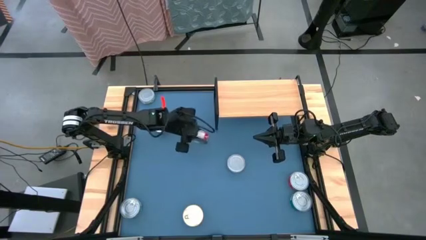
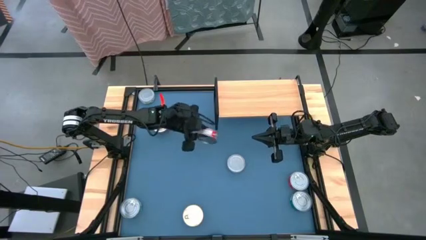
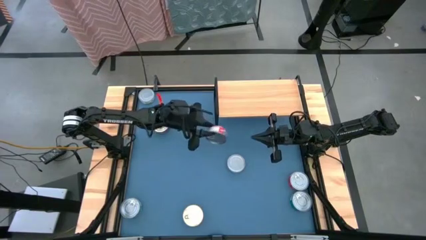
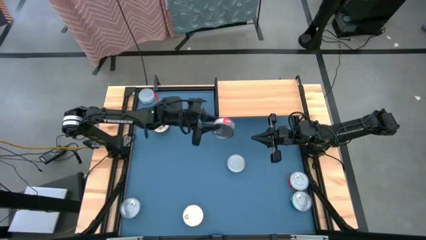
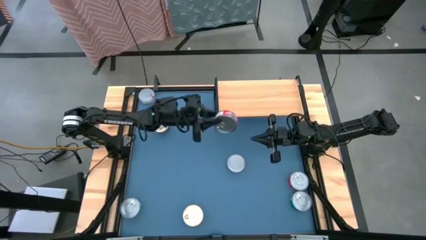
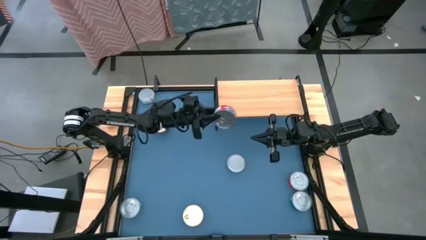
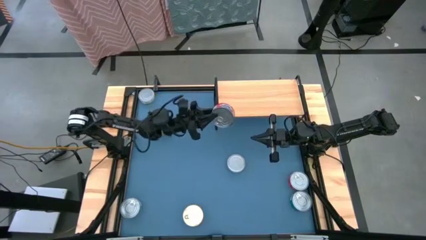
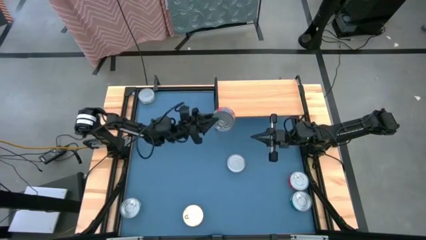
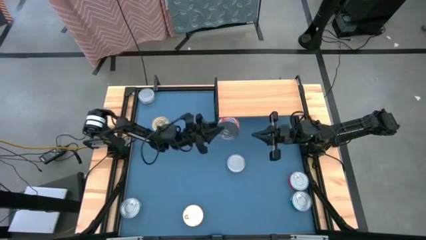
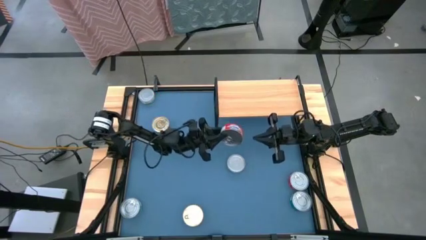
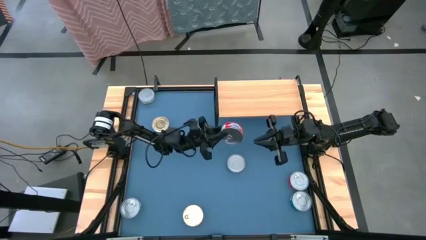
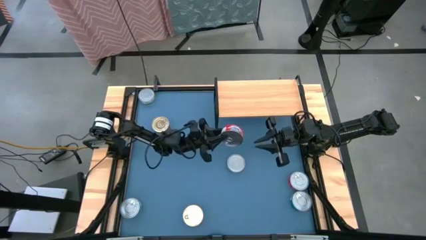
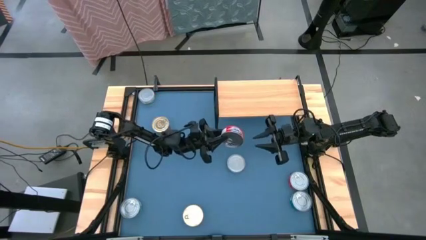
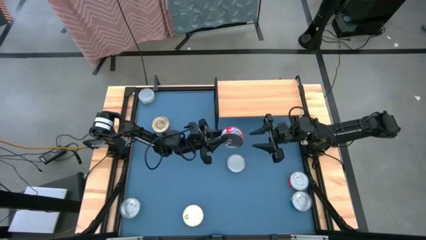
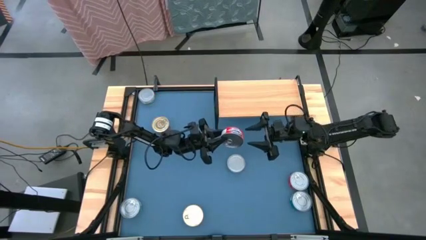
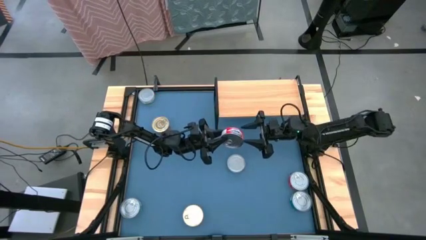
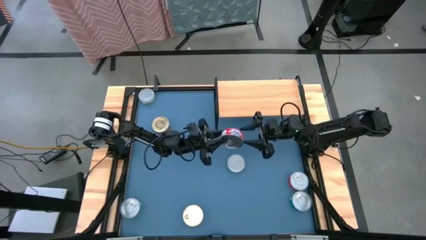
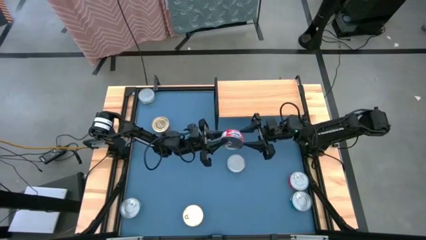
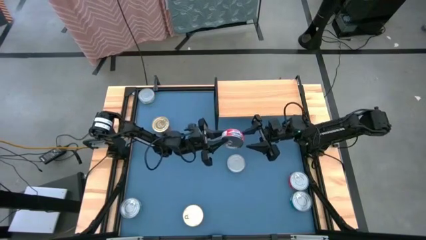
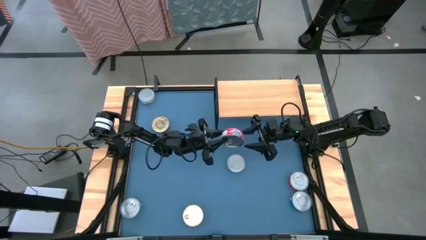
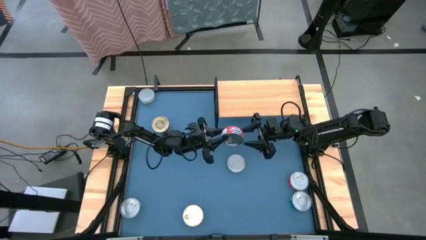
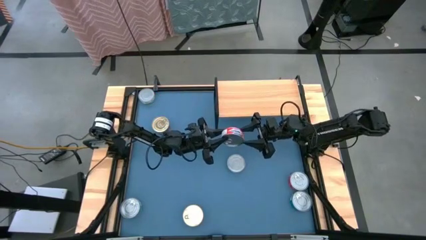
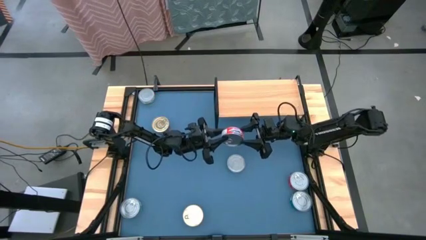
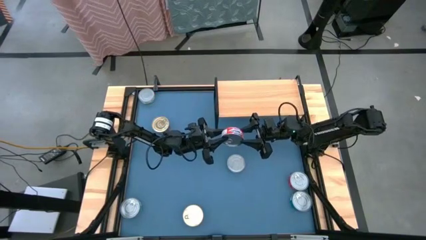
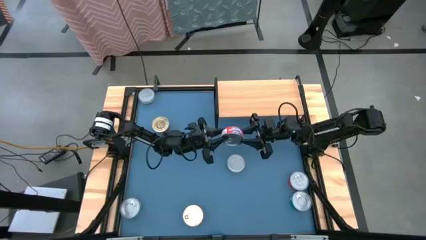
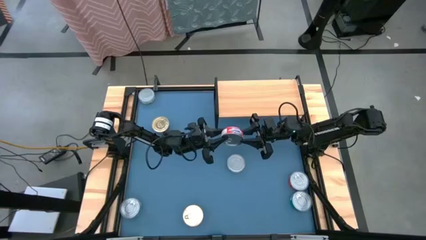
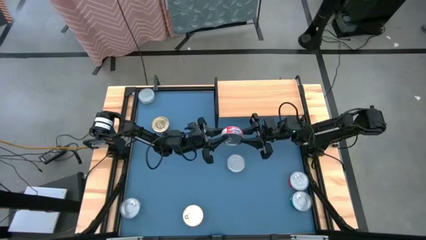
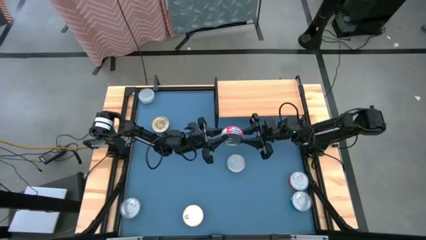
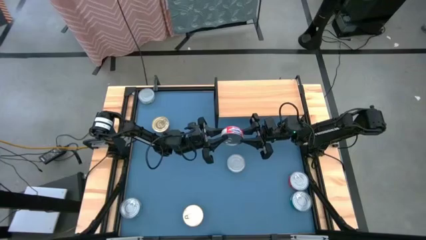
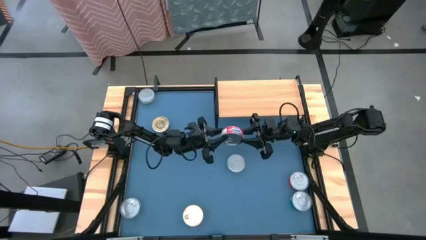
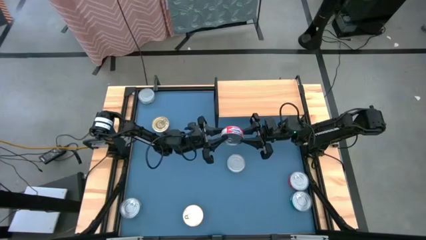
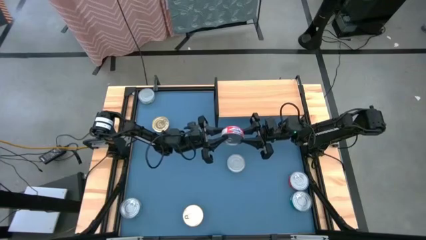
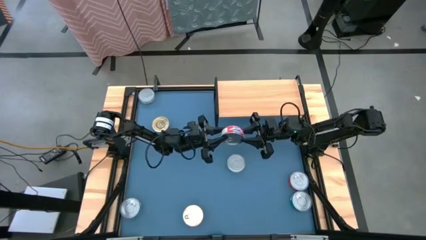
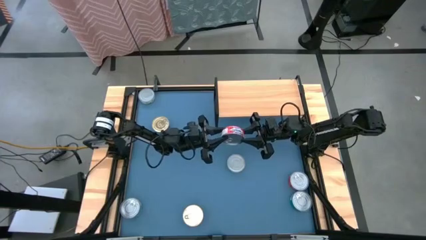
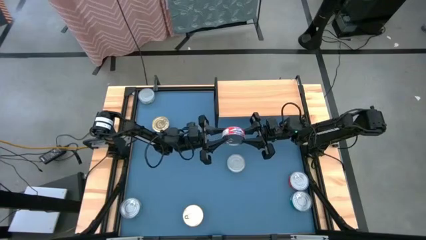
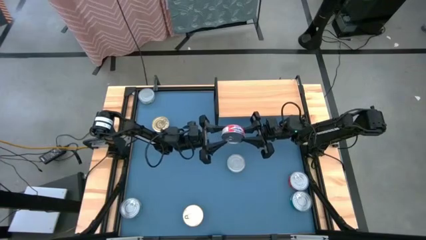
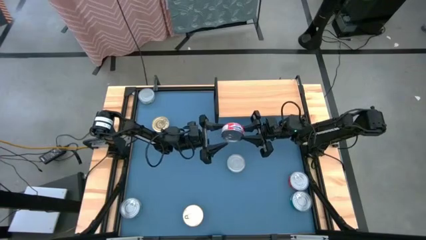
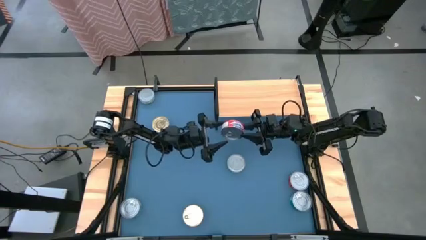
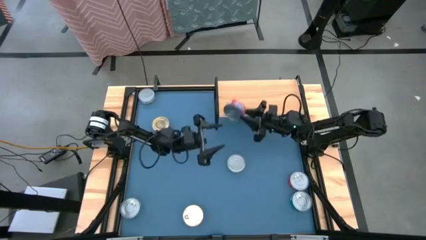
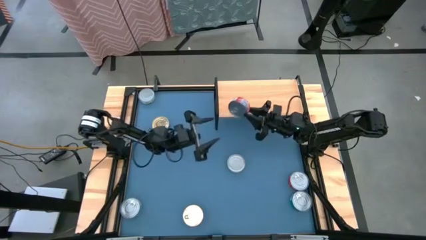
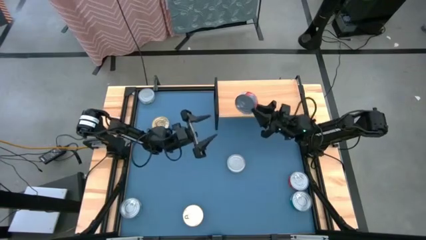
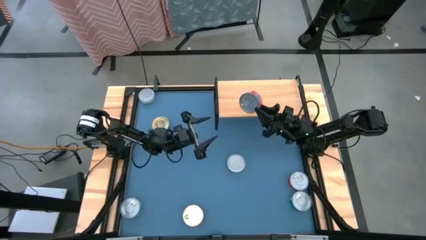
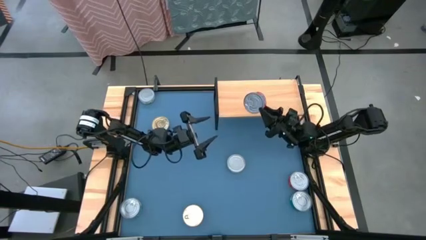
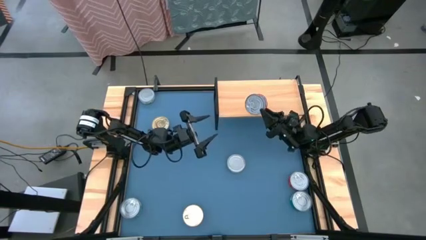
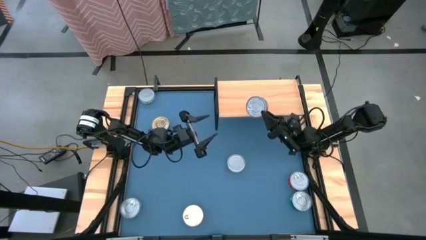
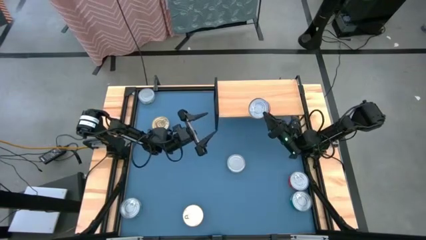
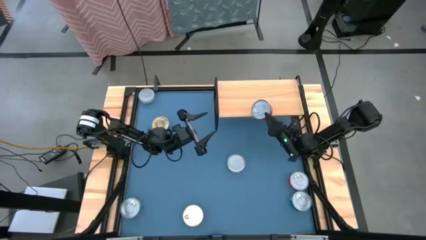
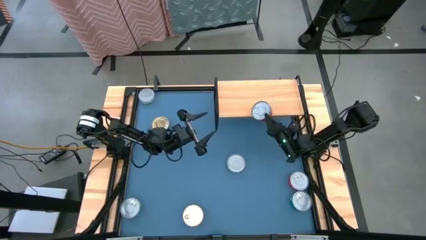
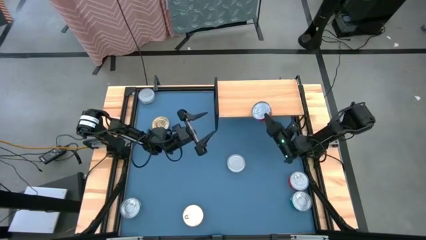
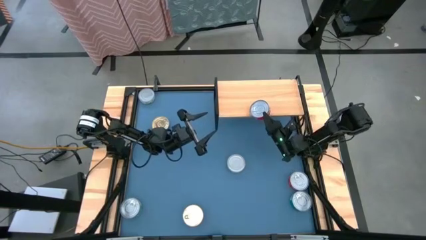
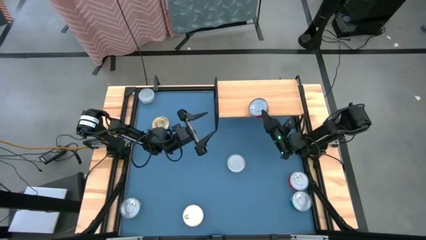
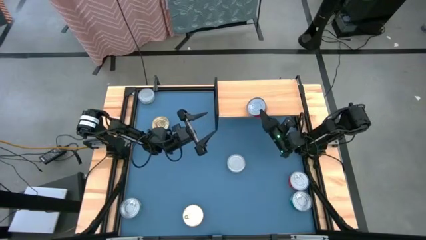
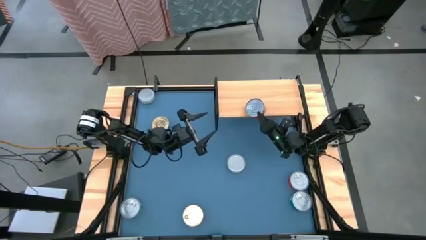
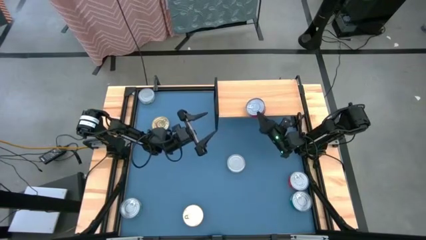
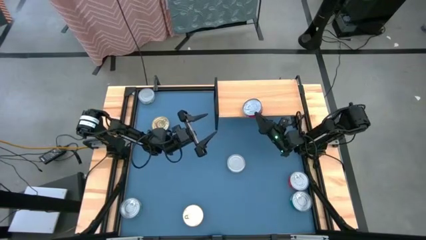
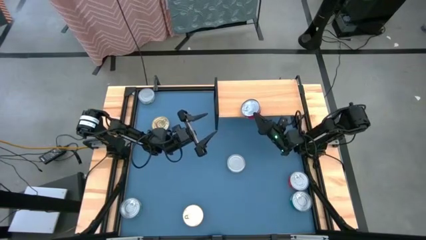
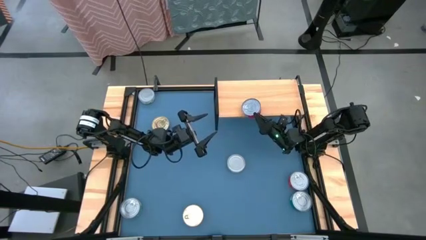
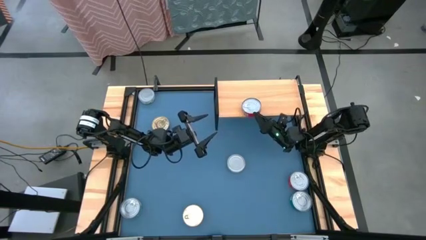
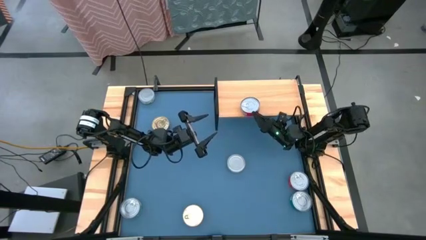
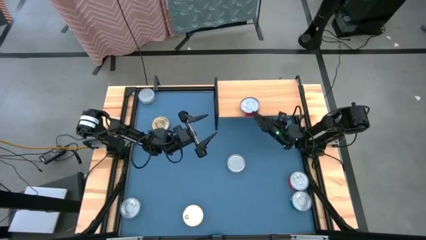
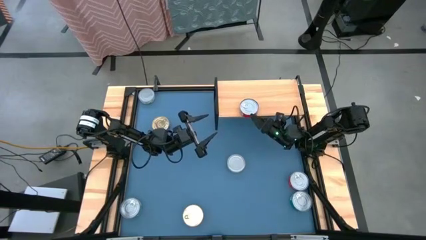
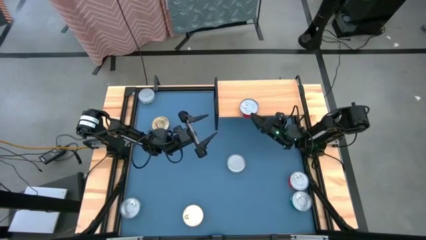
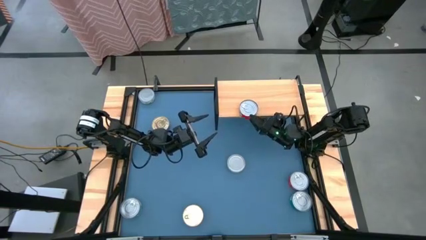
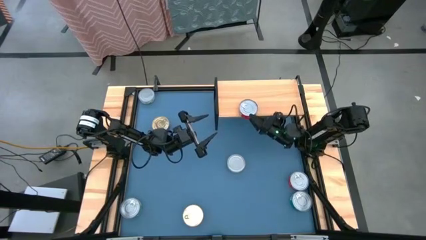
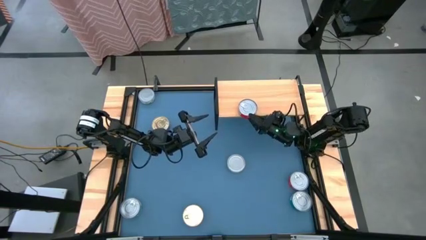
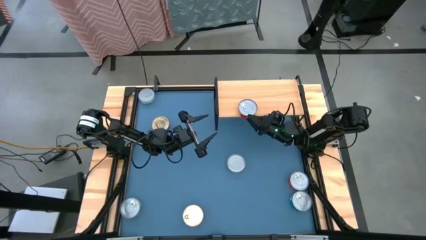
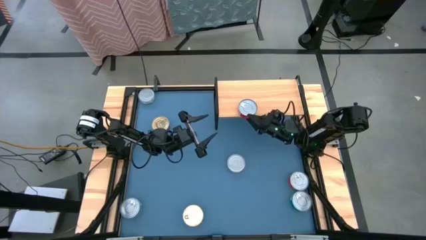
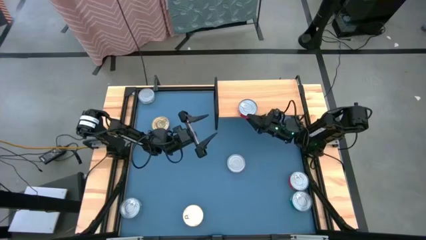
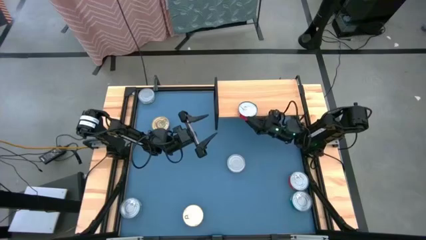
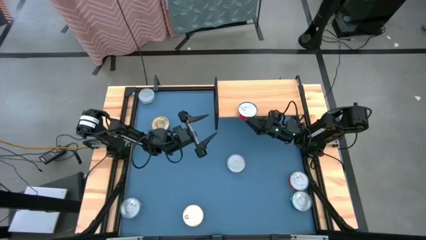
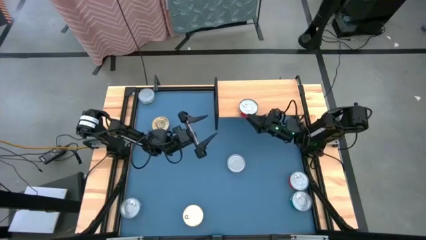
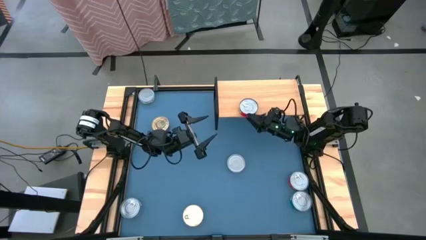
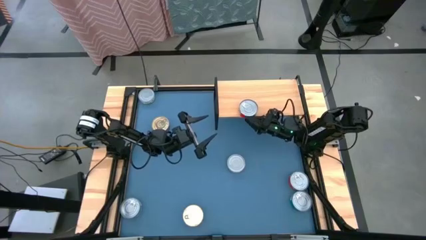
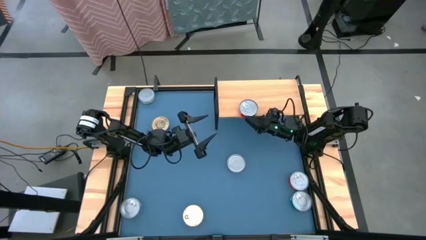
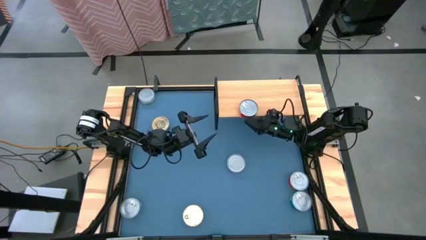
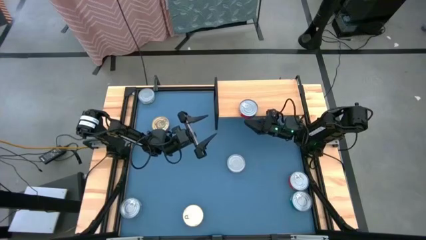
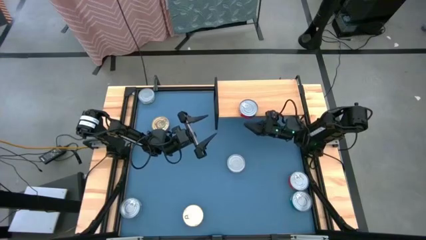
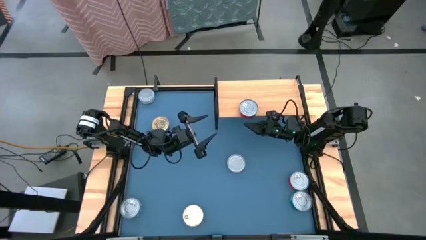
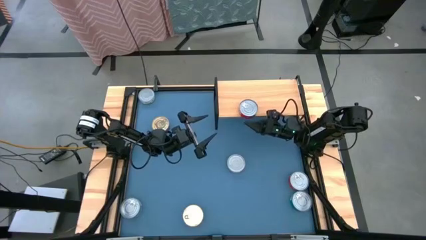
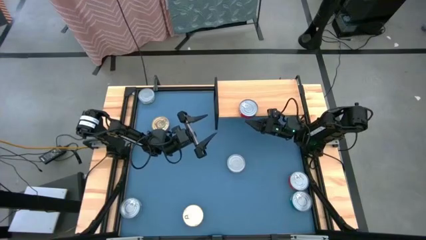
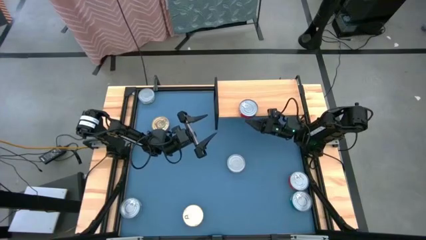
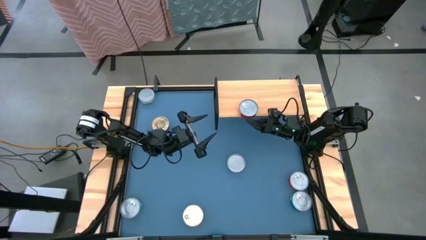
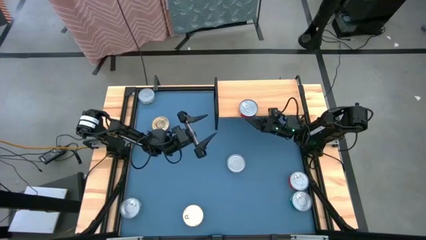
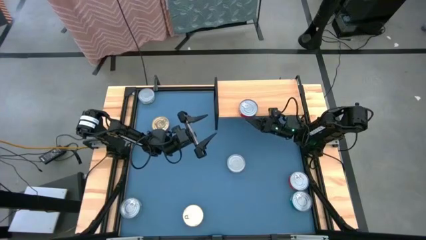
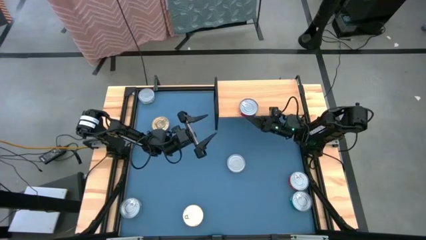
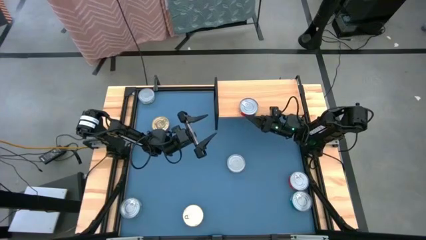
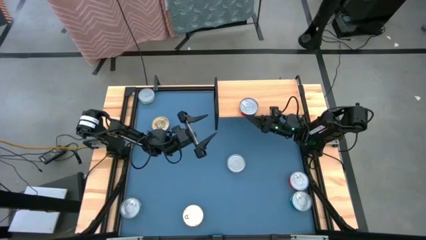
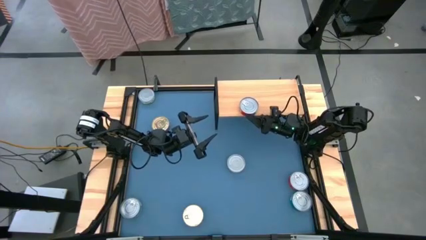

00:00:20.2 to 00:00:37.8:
Task: Stack canned seafood by type on shelf
Put the left red tuna can on the shelf
